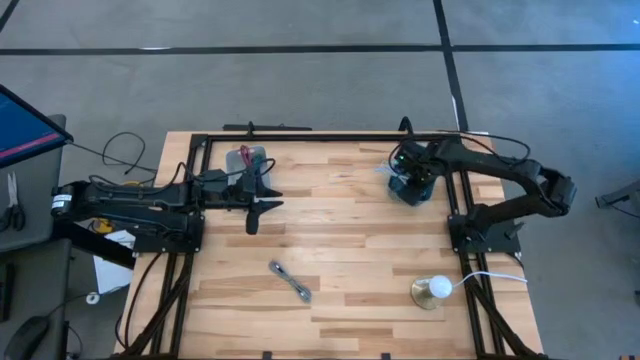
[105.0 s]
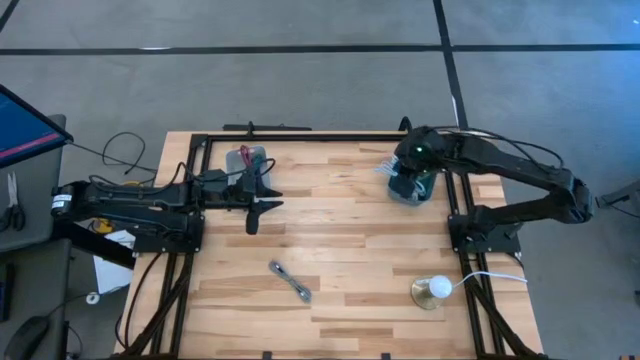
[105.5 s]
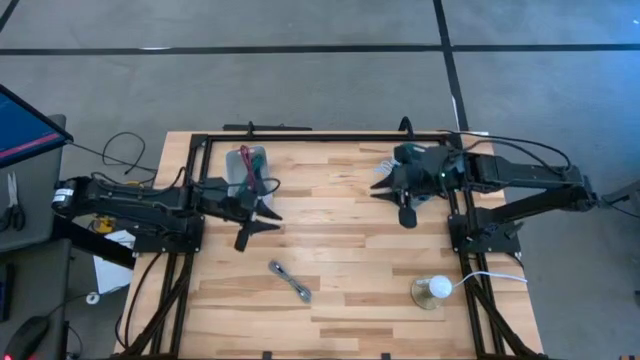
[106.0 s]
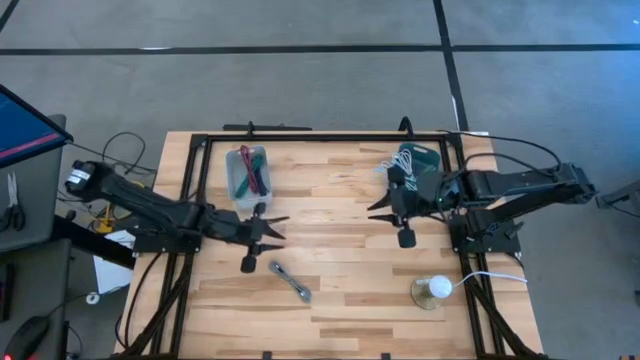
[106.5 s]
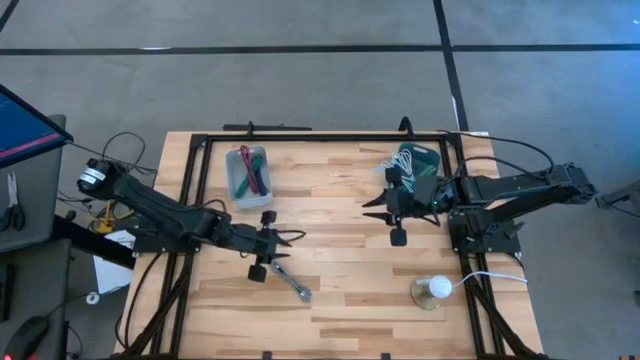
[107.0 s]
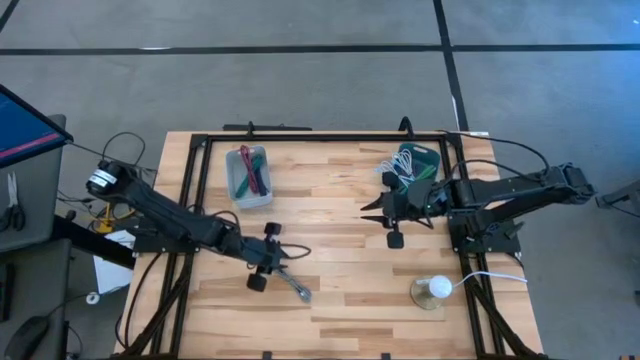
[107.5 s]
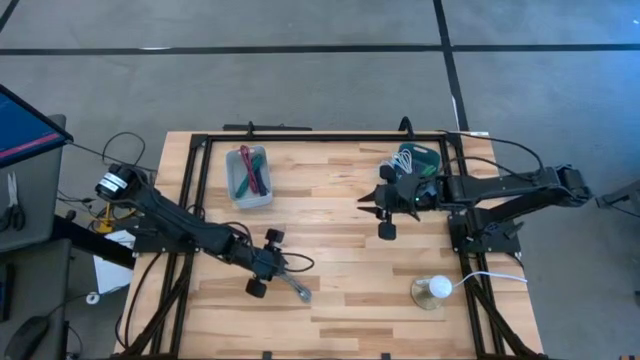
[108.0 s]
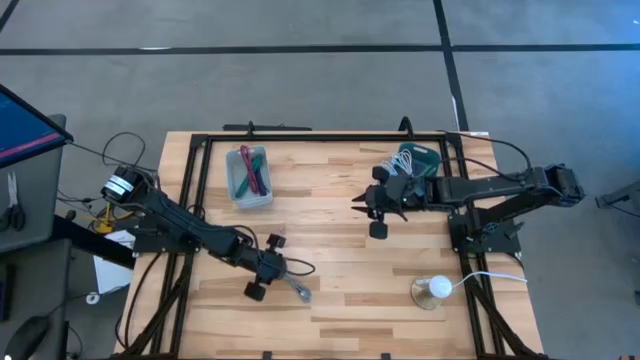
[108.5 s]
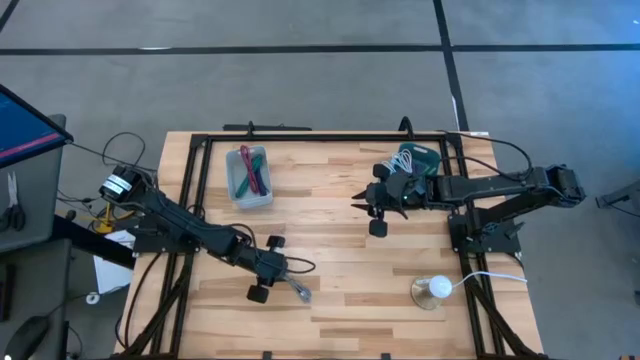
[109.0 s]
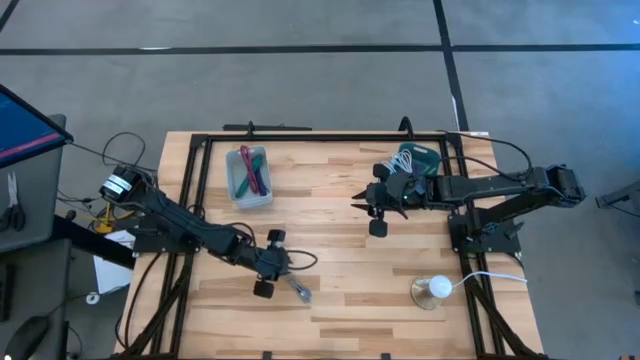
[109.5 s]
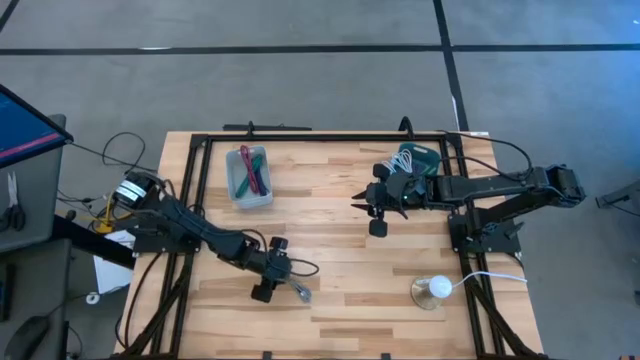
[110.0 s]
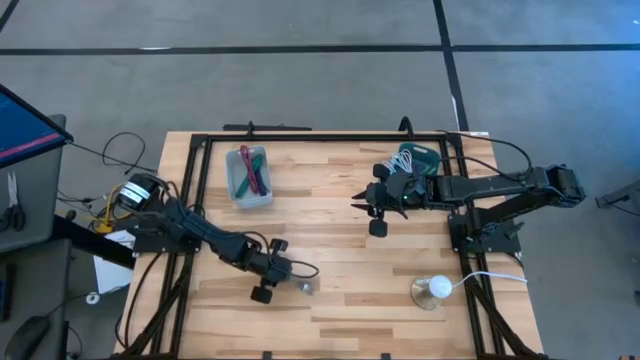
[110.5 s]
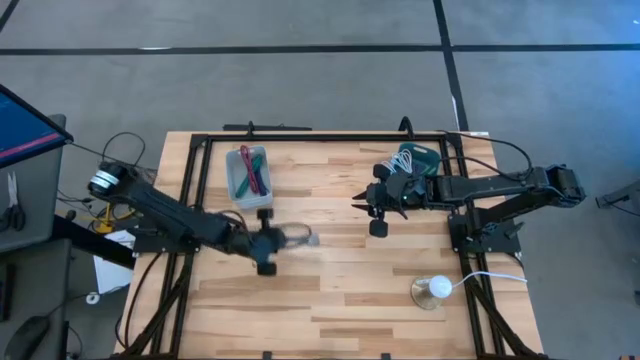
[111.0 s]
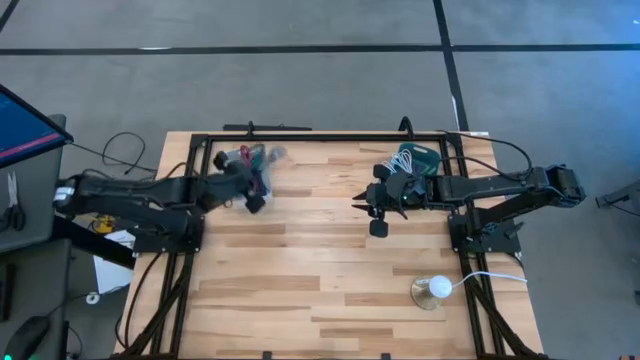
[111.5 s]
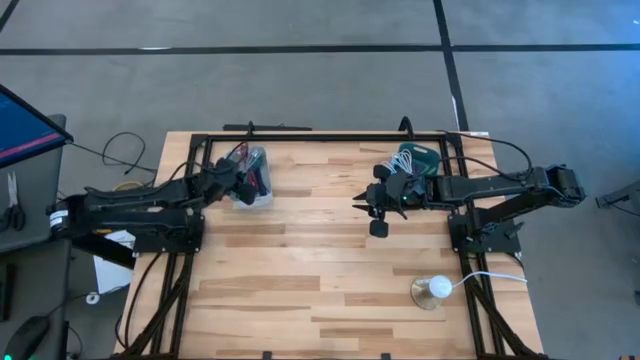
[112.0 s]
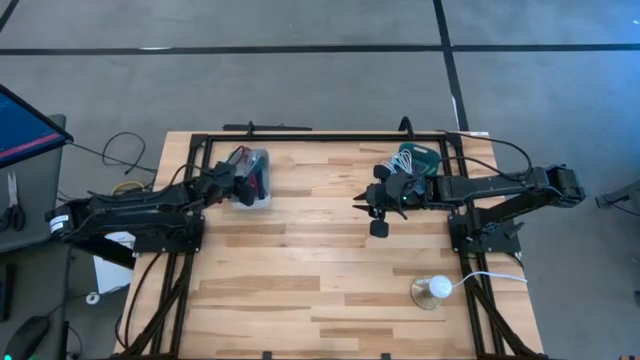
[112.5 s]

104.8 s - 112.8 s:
Task: Pick & Place USB Port
Put the gray patterned USB cable into the gray bin

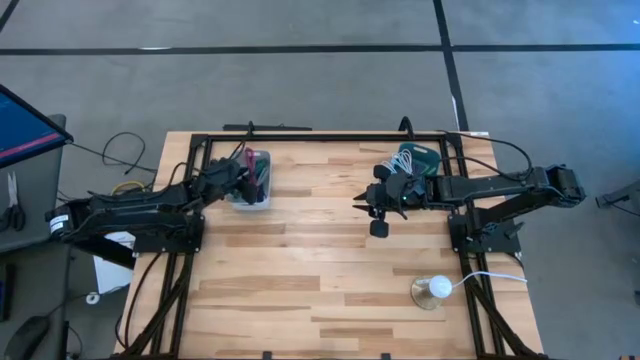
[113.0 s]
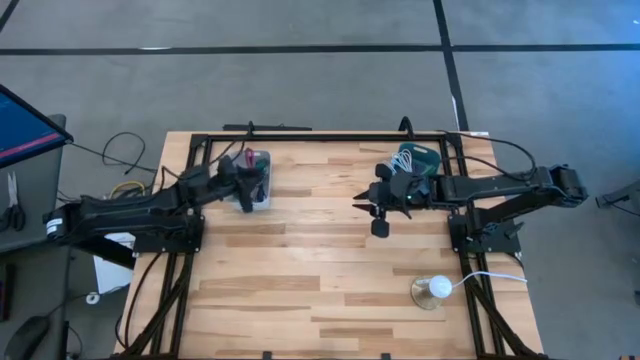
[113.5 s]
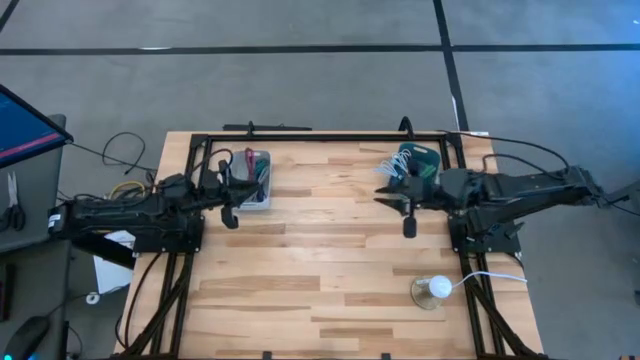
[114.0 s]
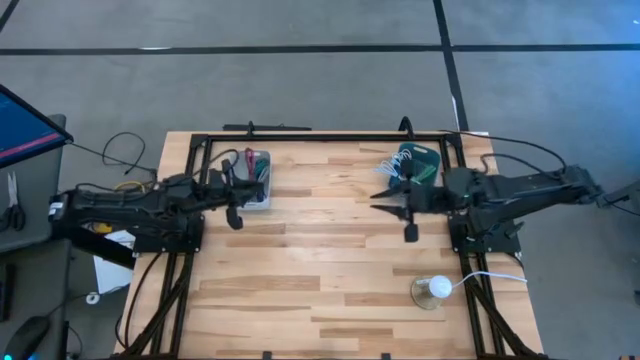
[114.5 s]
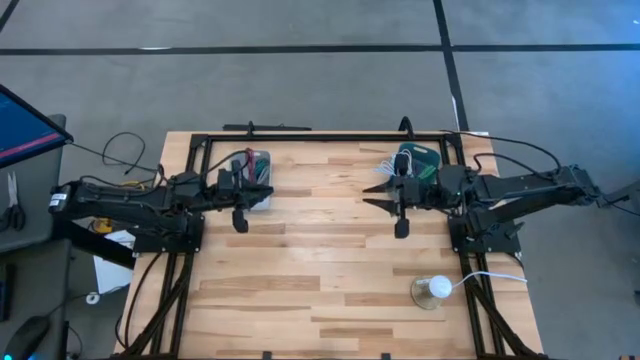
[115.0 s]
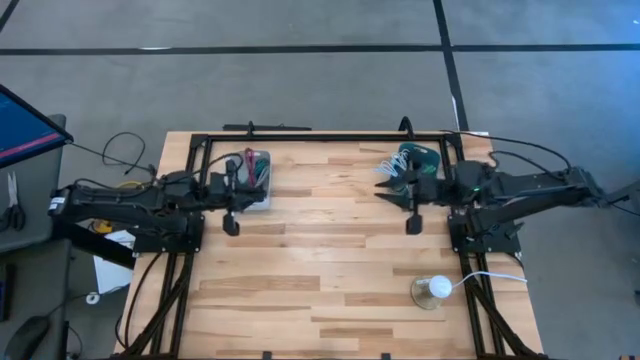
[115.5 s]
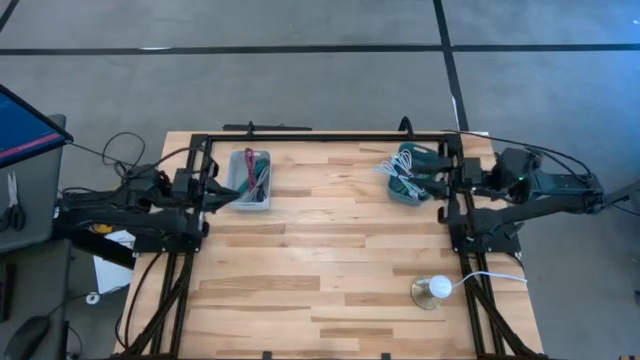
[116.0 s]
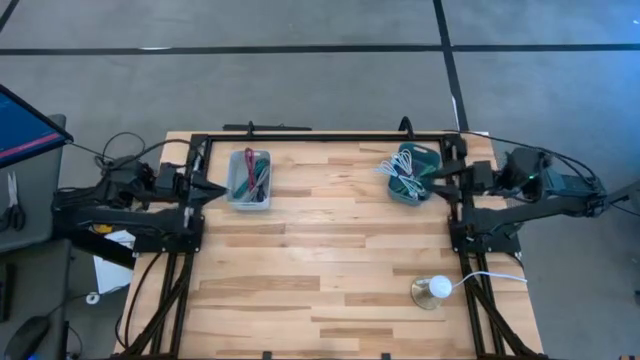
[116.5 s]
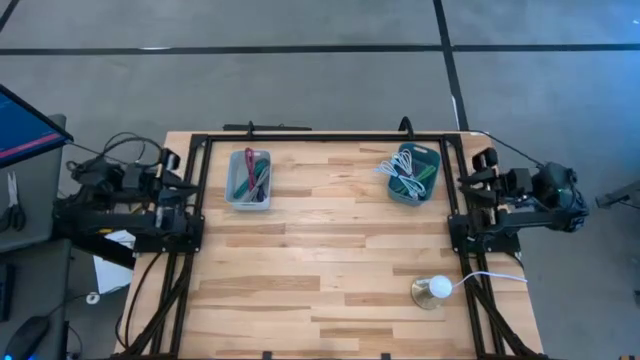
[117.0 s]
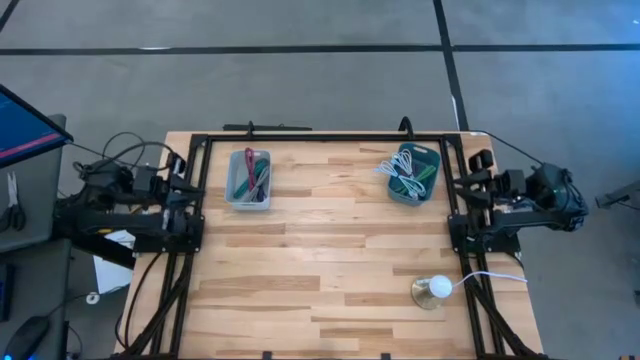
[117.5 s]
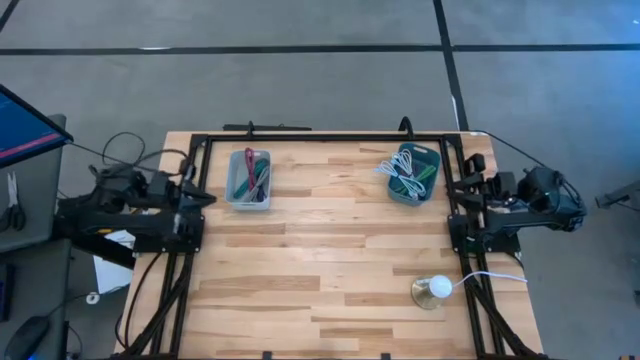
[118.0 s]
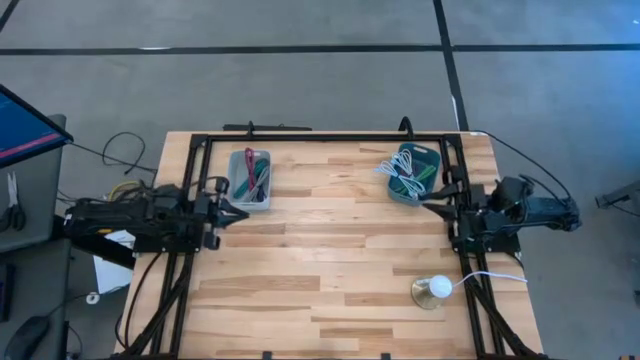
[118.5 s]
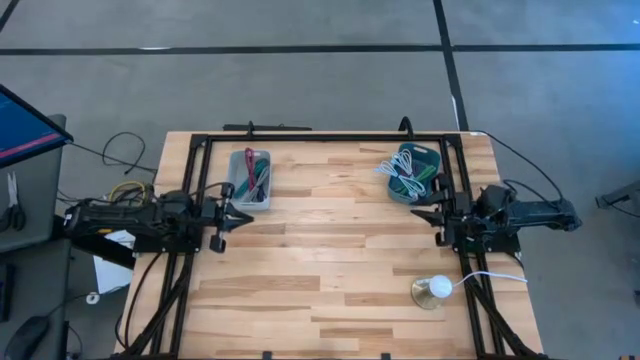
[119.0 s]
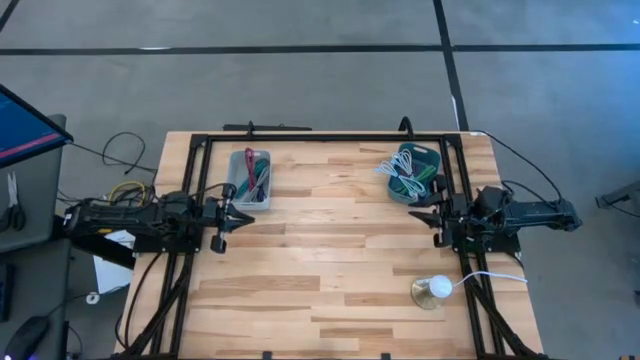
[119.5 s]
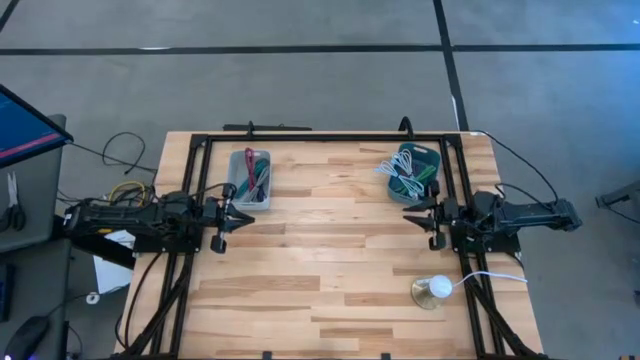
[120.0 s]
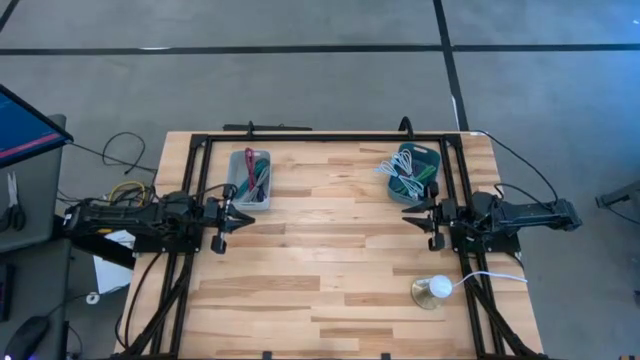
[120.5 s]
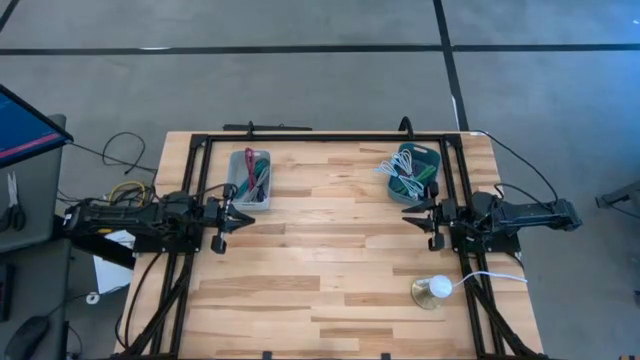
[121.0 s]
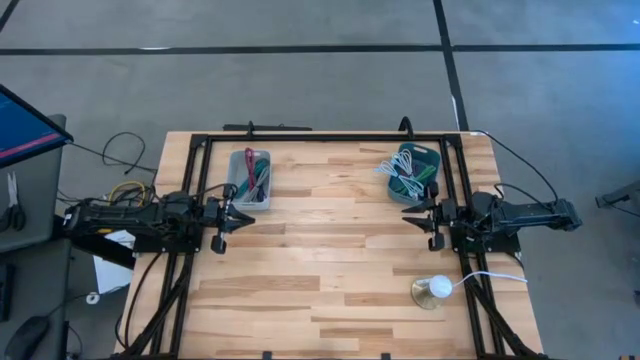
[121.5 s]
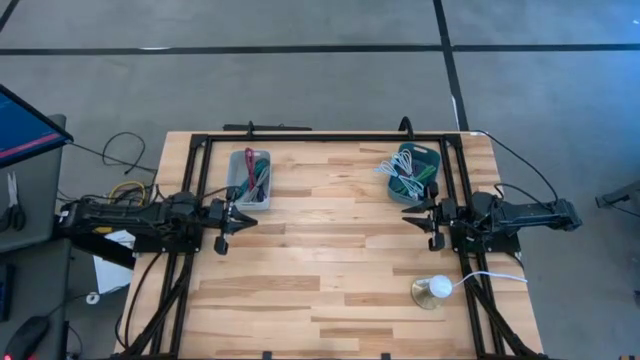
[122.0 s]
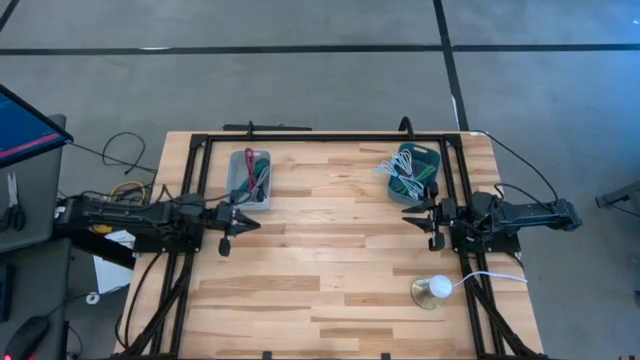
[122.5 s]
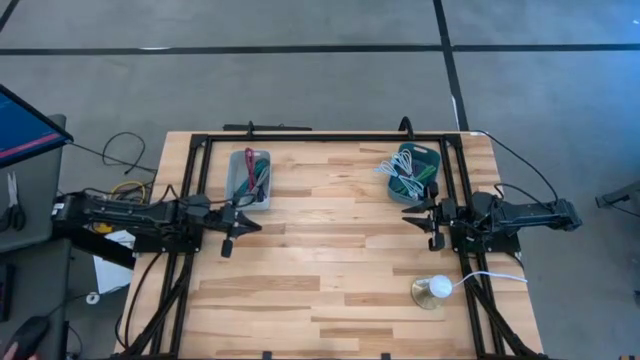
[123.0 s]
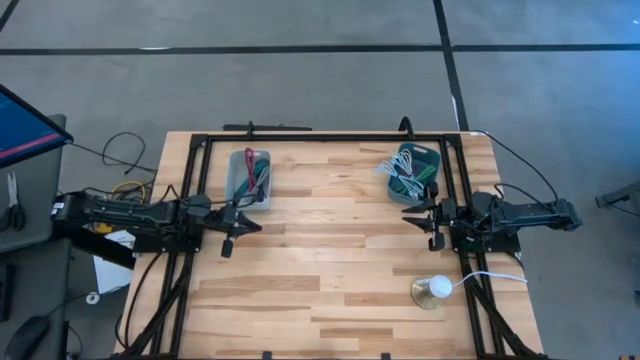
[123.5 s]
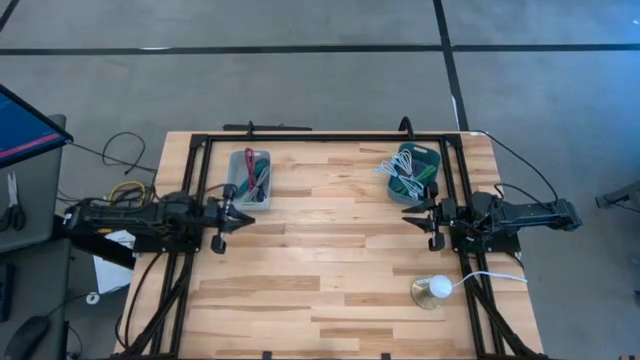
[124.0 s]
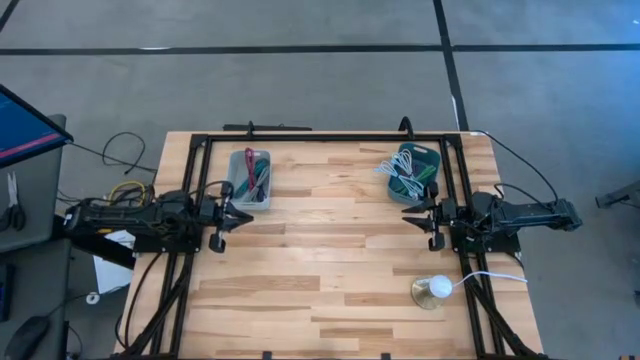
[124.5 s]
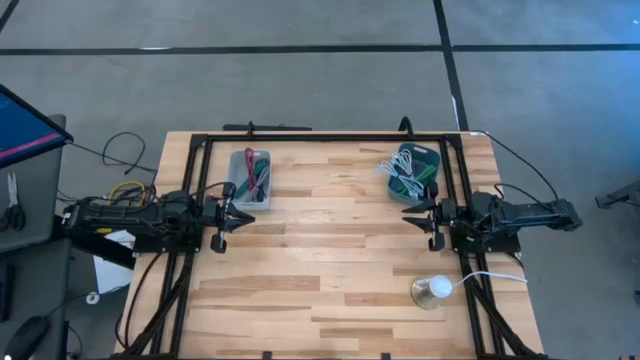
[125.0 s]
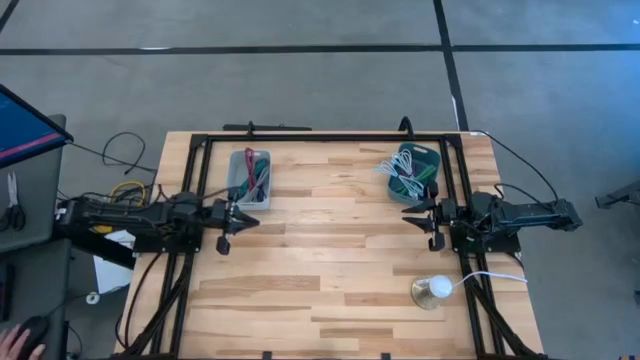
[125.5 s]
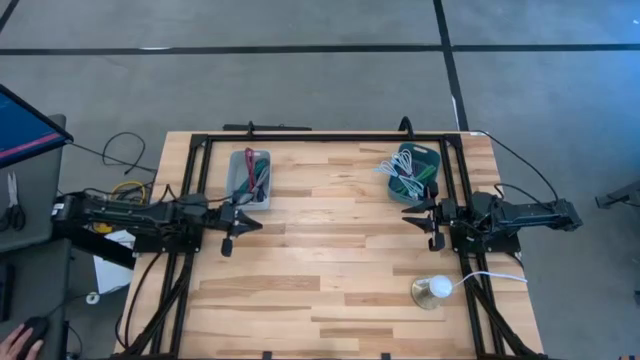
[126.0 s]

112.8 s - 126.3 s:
Return to Home Position

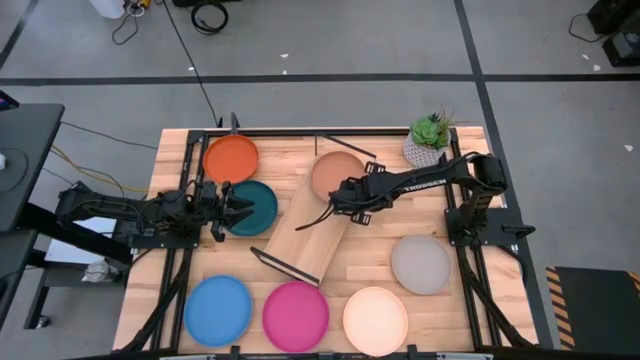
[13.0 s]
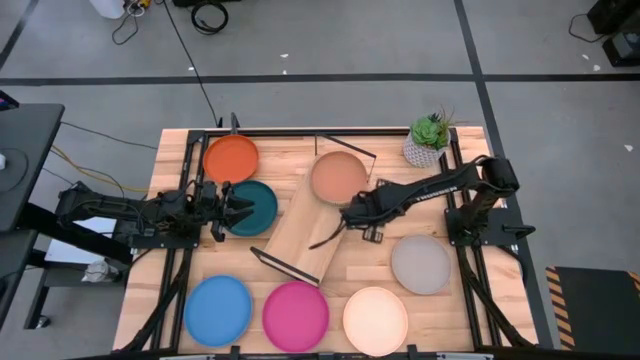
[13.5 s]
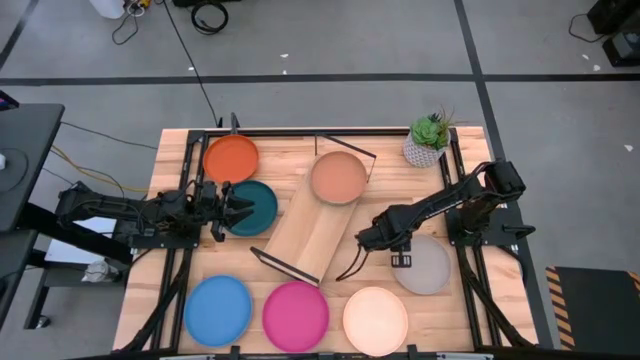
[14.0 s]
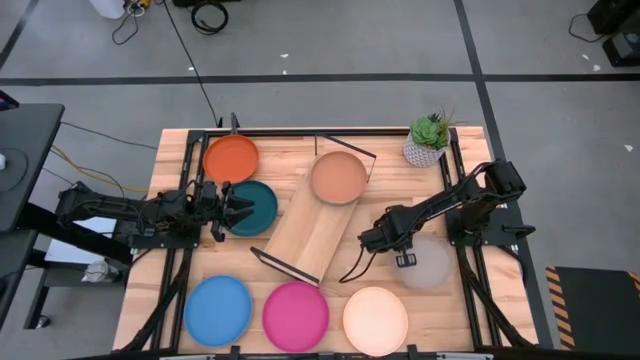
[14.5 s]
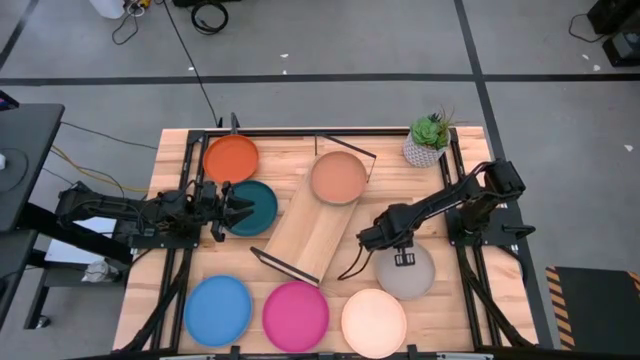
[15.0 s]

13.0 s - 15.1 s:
Task: Place and stack plates onto a shelf
Stack the gray plate on the top of the brown plate on the shelf
